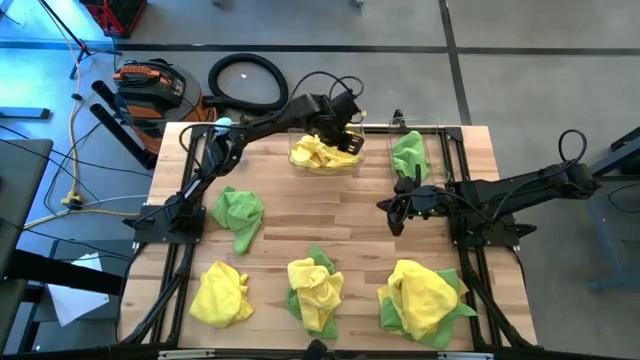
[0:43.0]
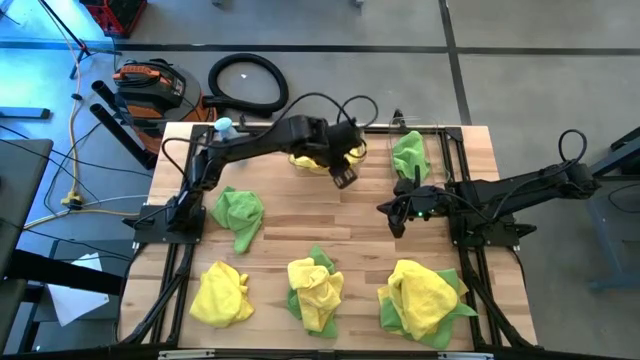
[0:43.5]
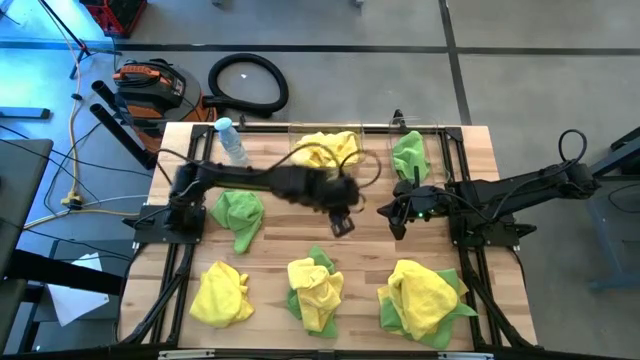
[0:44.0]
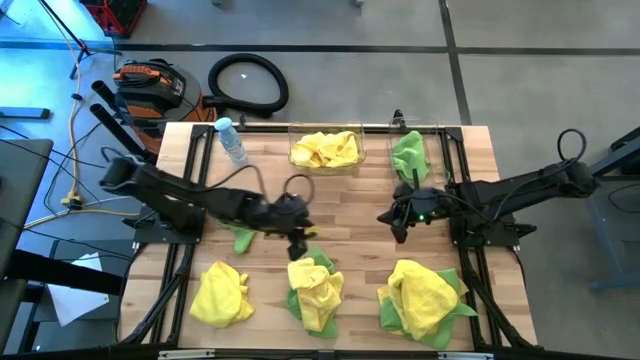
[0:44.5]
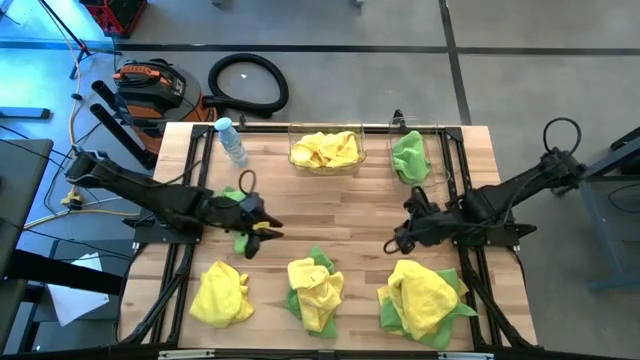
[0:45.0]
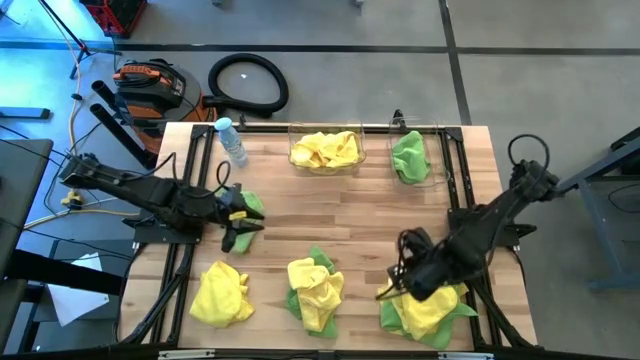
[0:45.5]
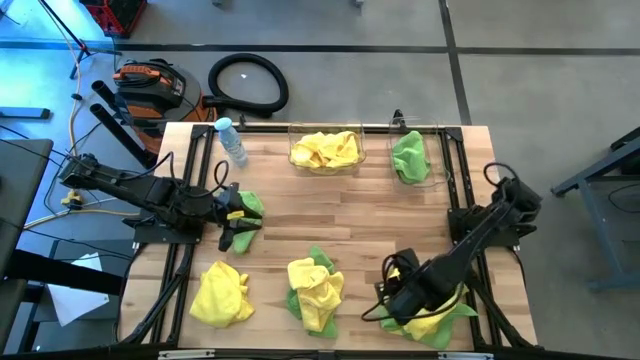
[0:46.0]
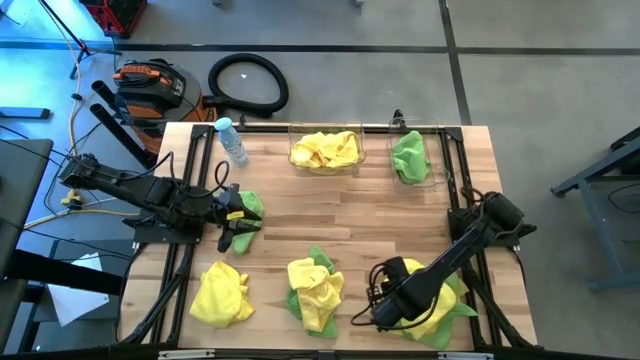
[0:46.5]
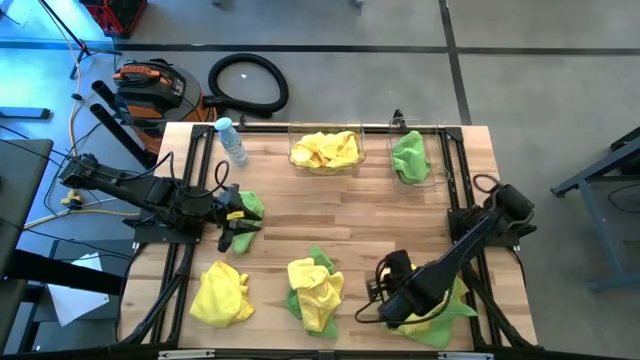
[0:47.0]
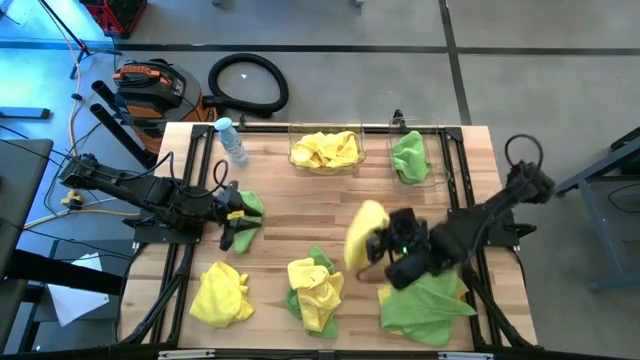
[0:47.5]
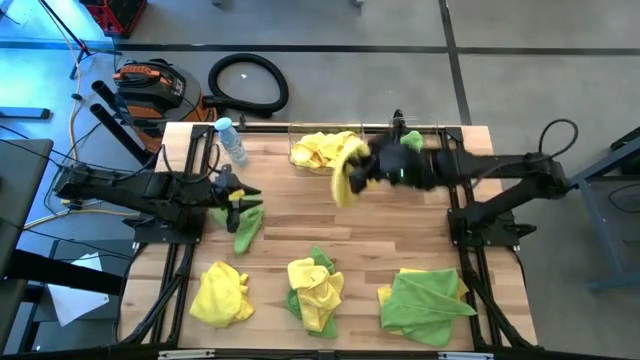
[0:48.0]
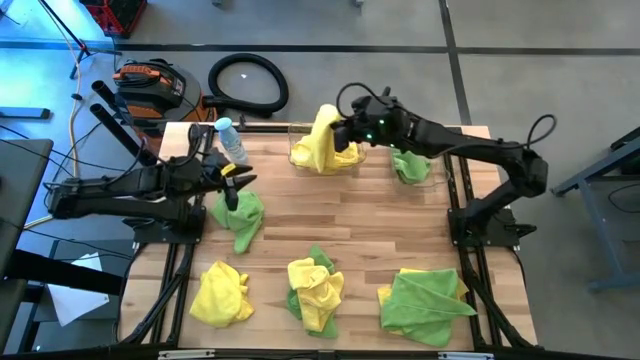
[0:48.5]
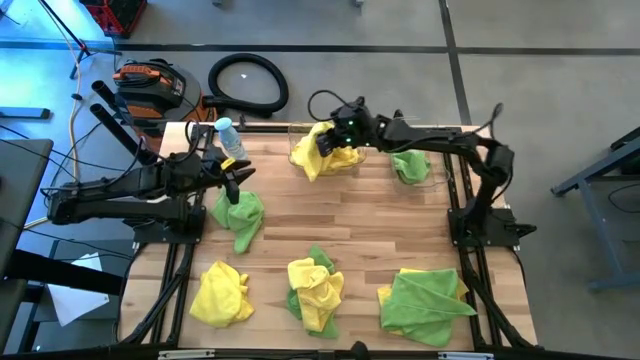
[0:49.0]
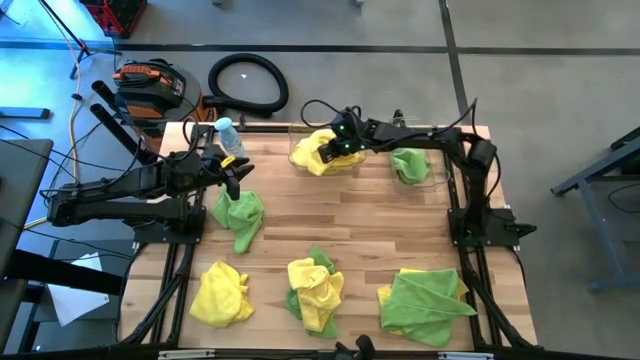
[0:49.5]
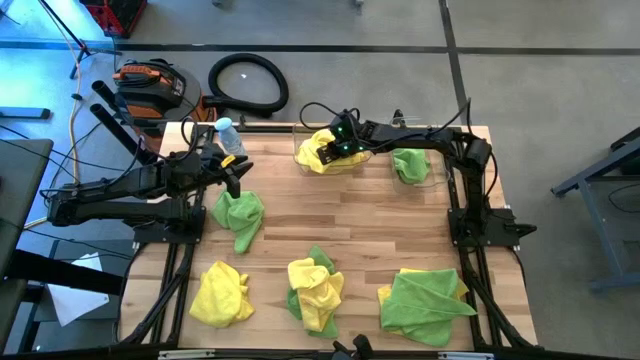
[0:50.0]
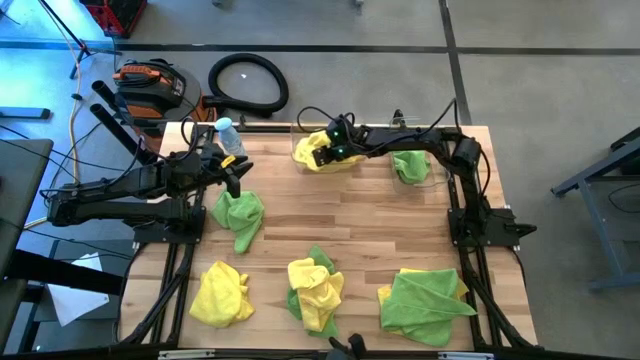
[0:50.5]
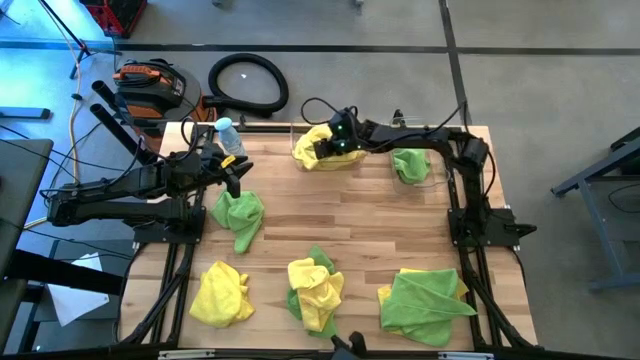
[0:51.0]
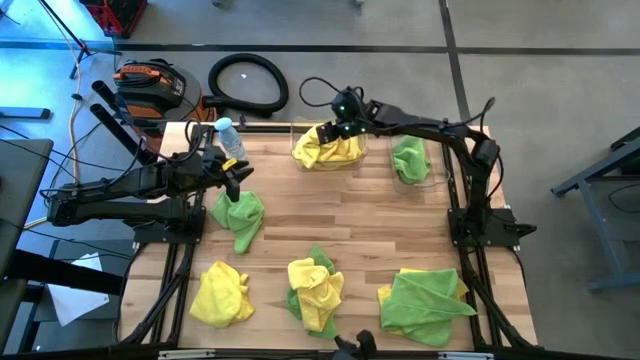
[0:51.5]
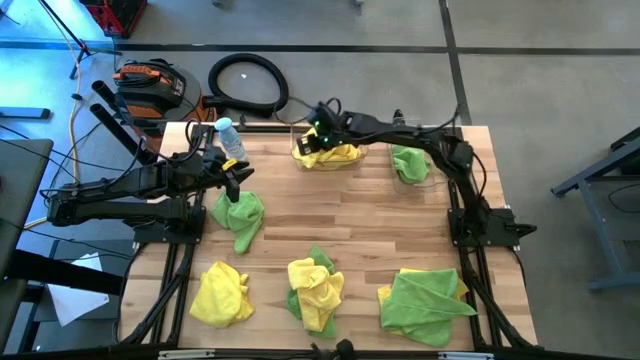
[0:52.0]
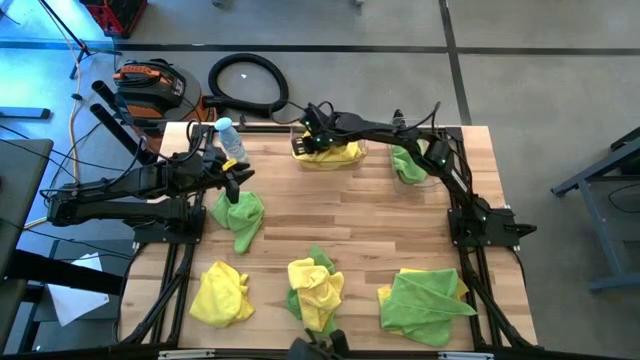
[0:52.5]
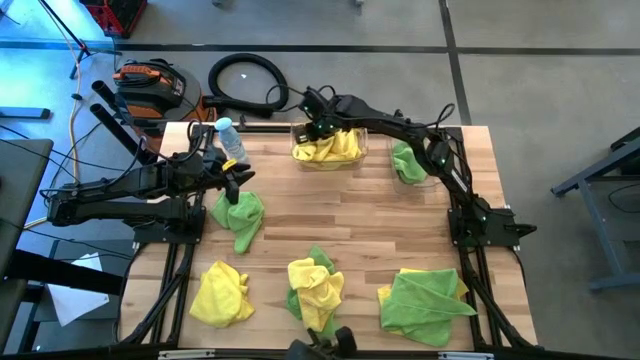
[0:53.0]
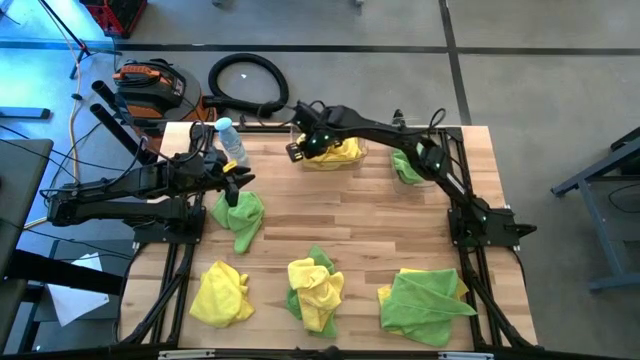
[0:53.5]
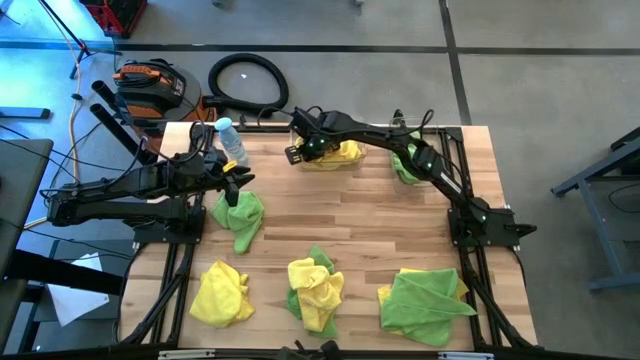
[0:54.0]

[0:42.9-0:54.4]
Task: Sort microfiber towel by color & place in baskets
Put the right yellow microfiber cloth into the left transparent bin

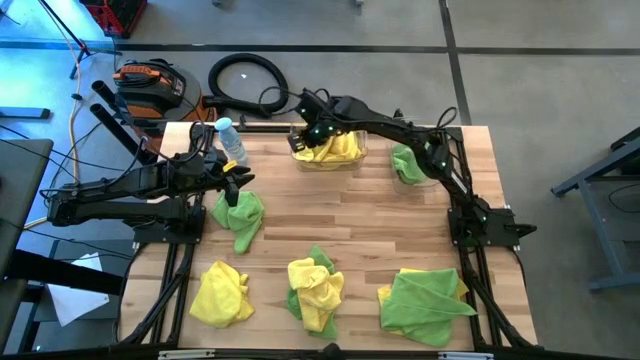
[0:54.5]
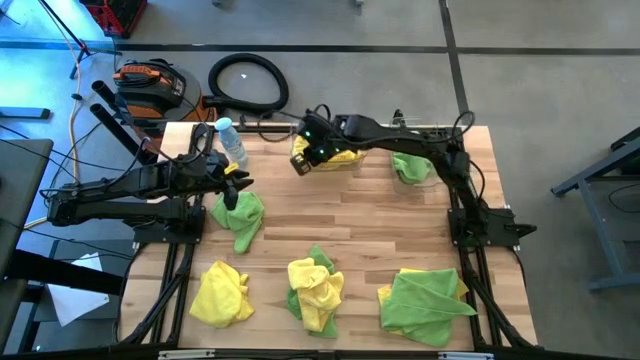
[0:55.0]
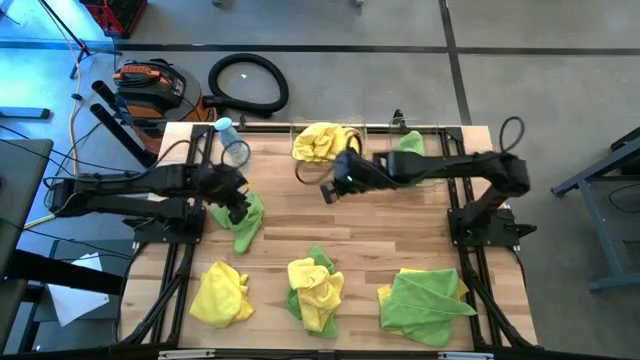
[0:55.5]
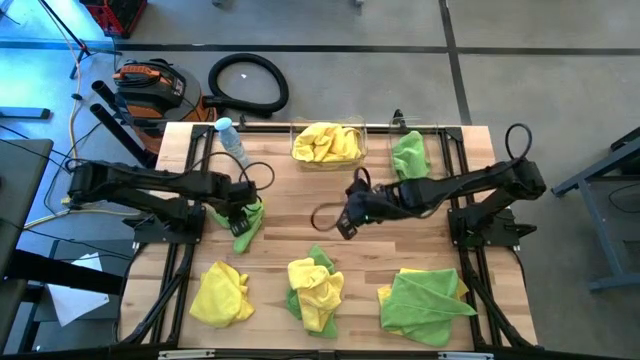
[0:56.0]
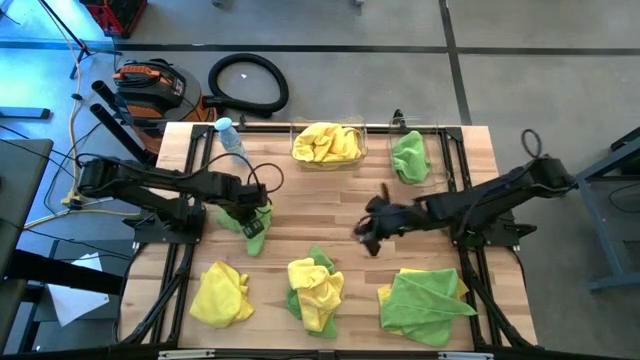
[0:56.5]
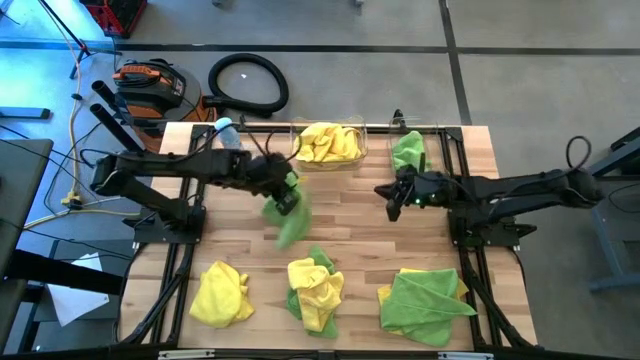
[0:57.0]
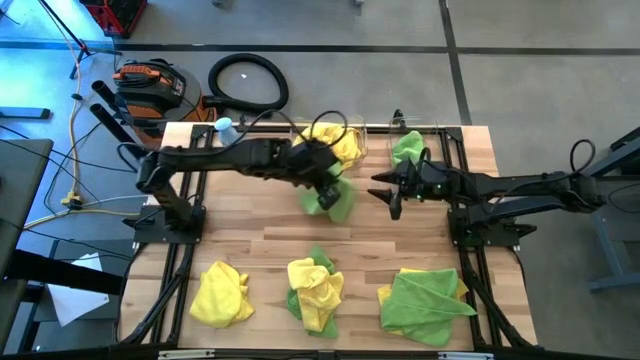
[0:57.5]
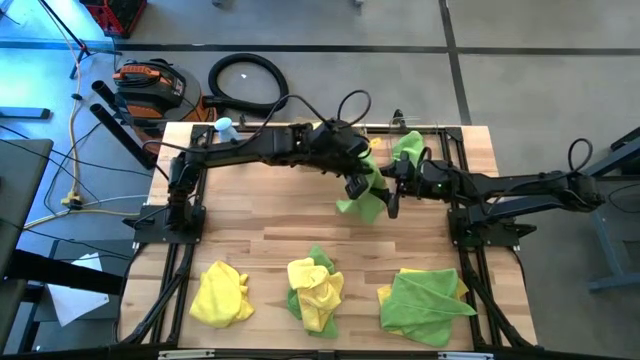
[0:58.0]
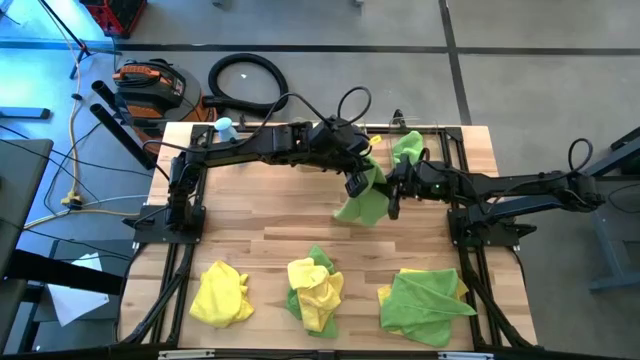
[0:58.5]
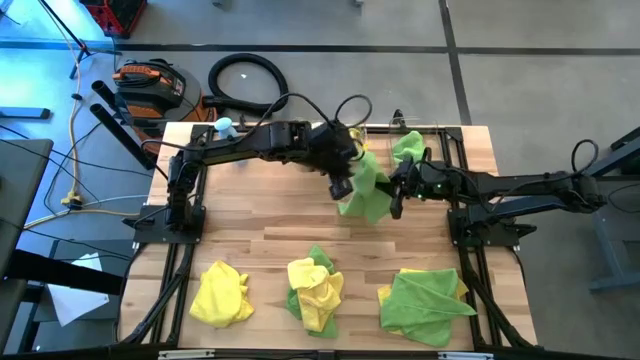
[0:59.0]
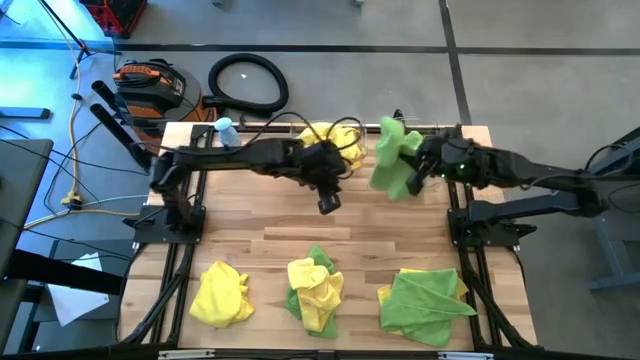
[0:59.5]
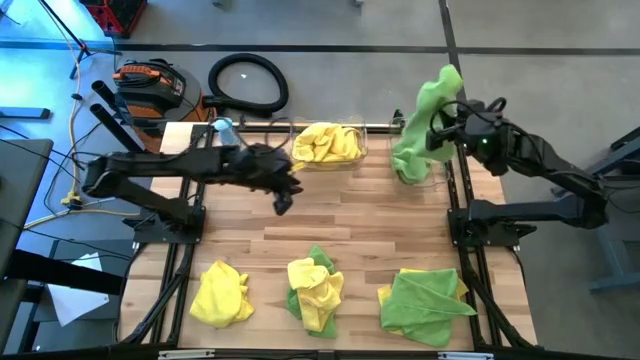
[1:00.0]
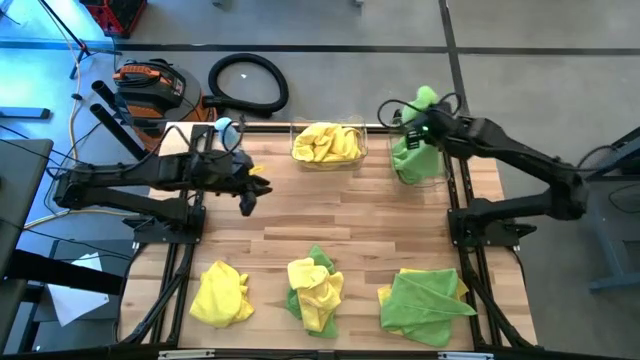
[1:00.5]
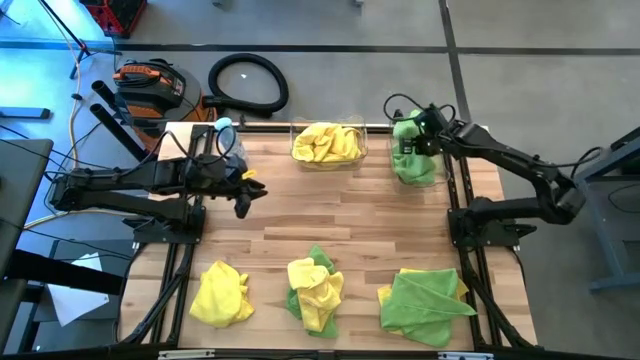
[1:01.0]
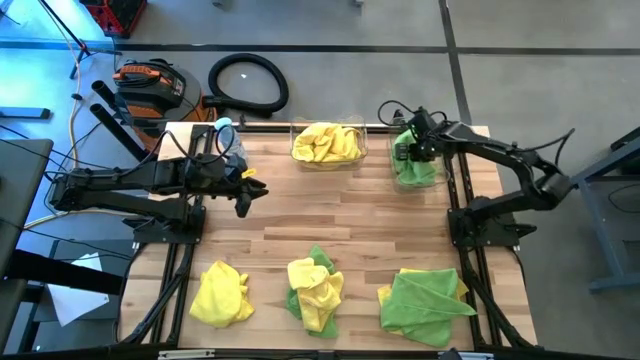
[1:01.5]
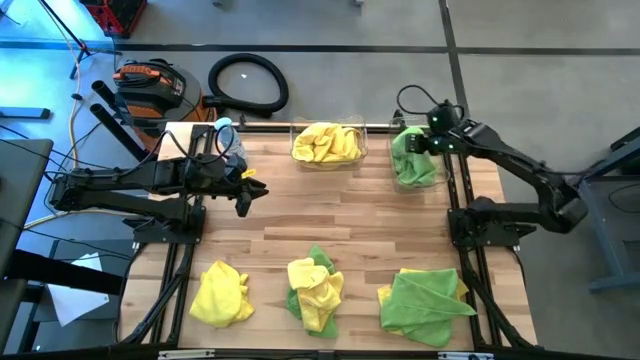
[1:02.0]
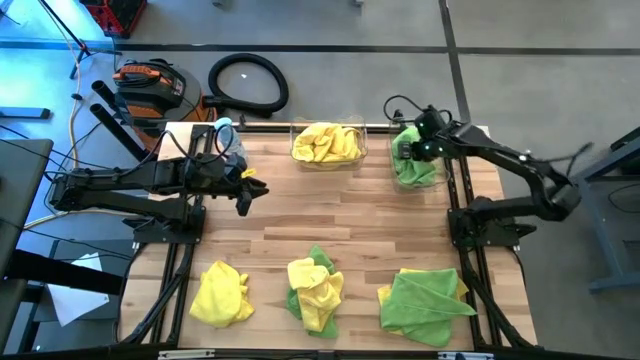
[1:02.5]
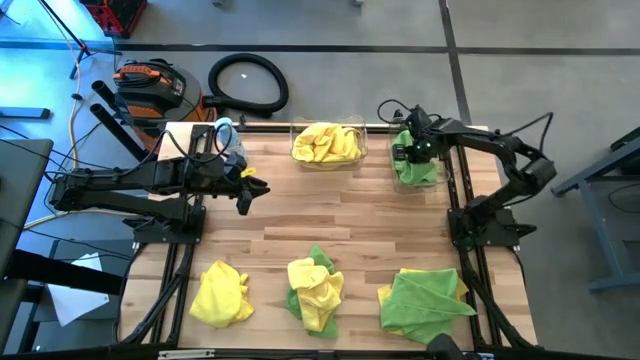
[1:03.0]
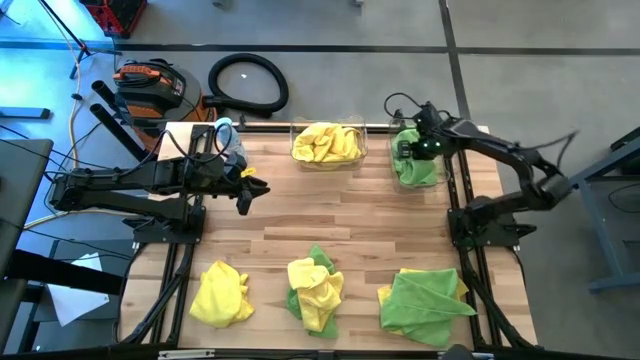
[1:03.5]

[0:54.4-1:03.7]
Put the top left green microfiber cloth into the right transparent bin
